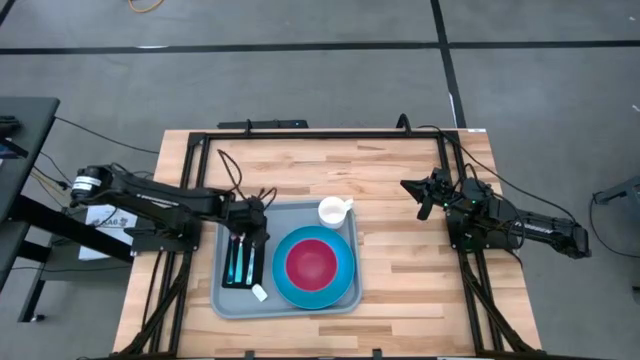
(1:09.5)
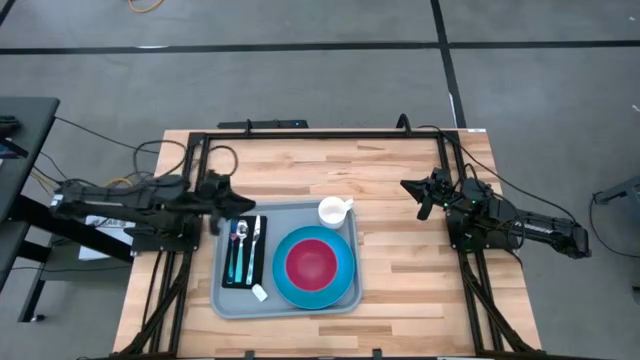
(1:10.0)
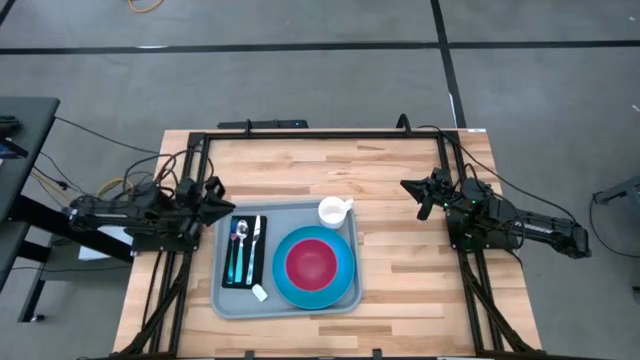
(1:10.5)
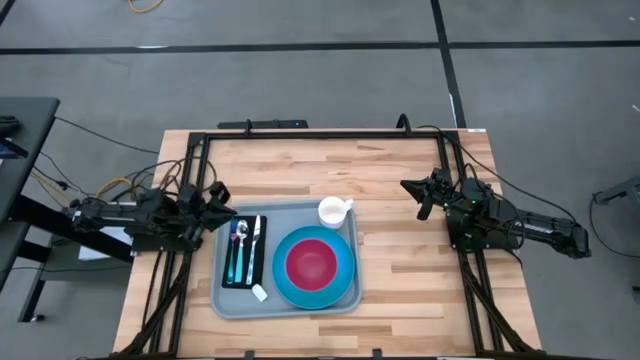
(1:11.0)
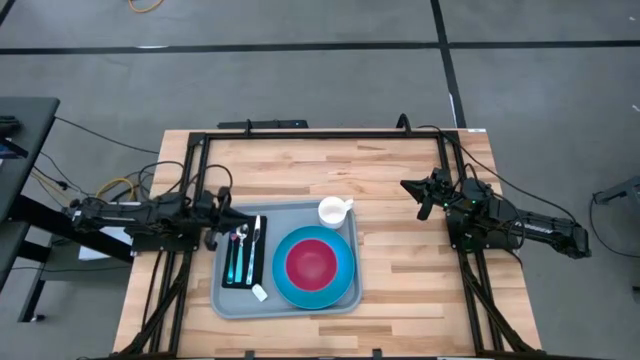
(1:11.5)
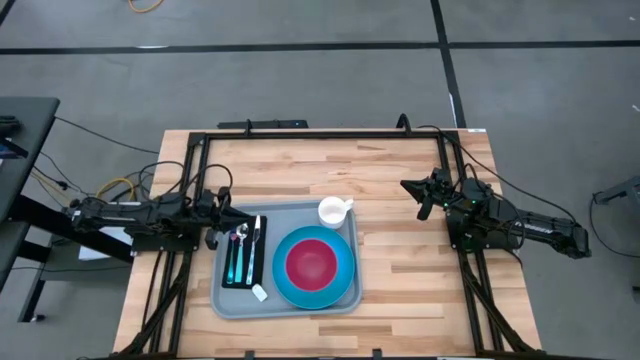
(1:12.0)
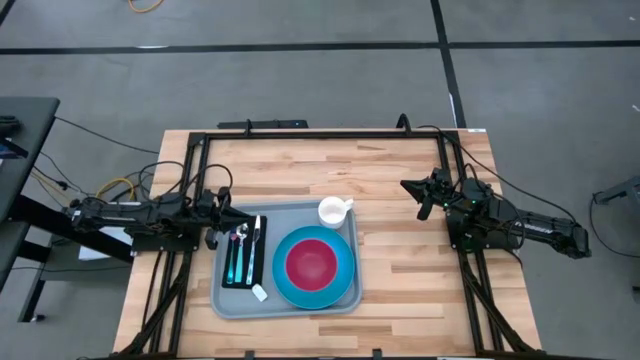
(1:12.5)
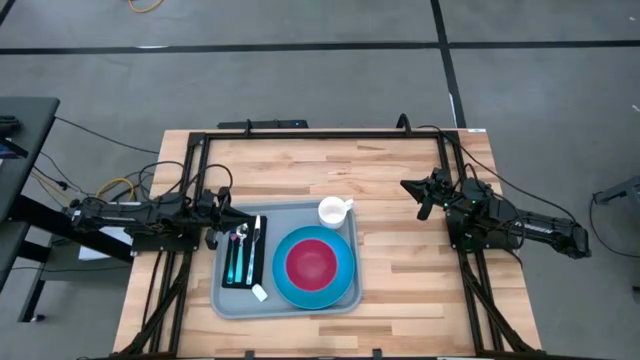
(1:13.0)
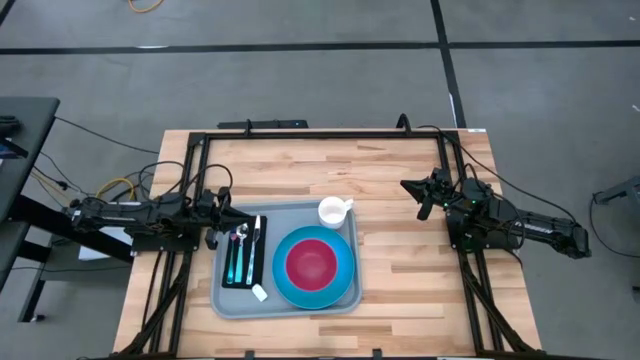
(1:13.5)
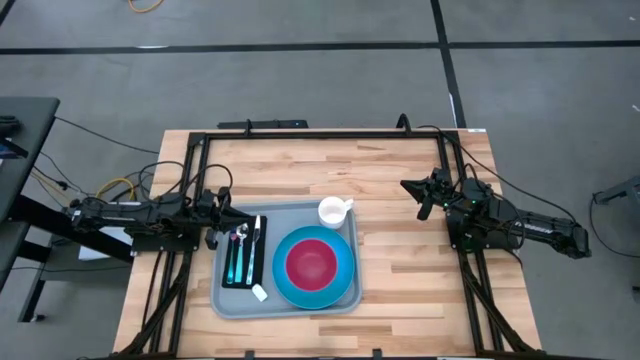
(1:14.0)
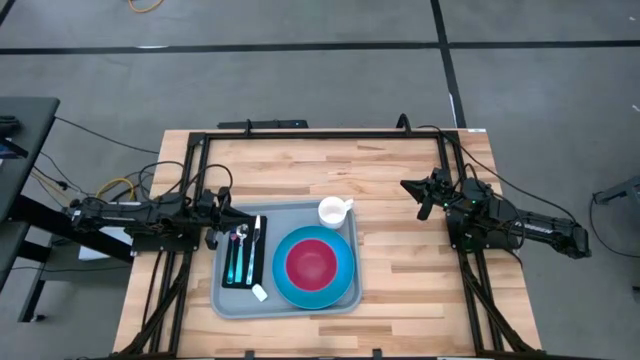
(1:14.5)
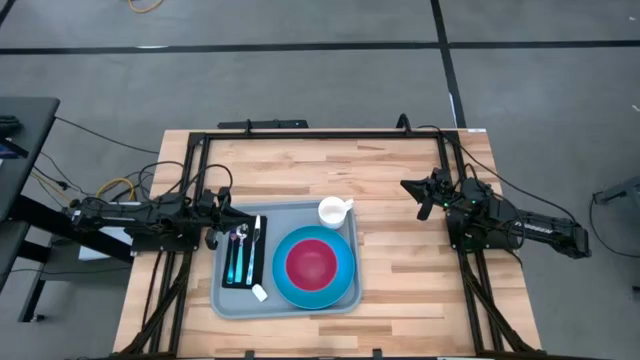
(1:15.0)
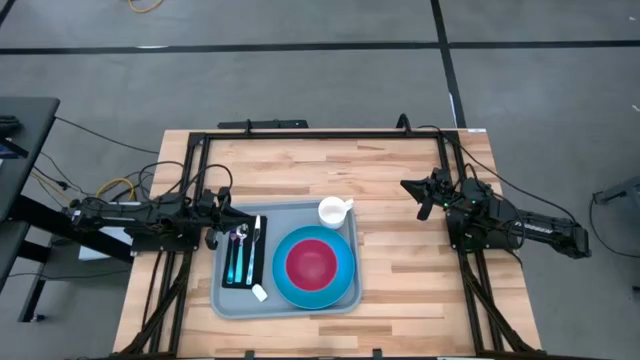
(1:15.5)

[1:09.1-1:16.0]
Task: Set up tray
Return to Home Position

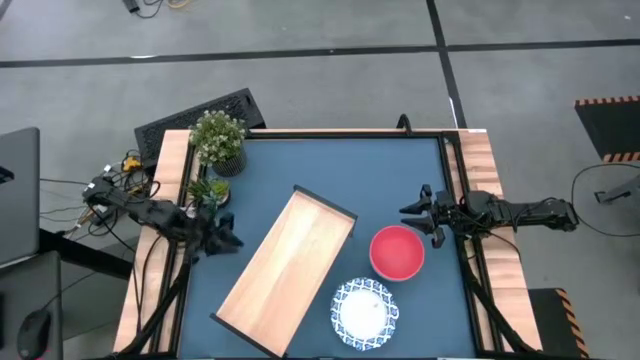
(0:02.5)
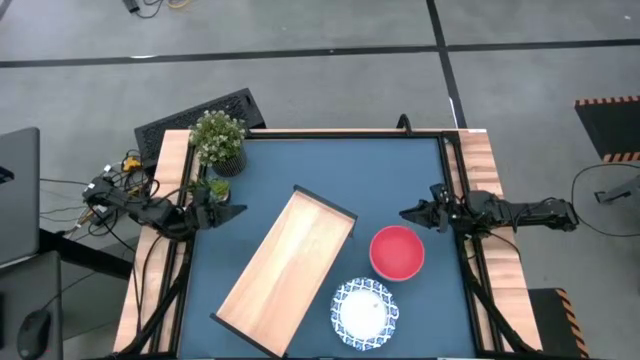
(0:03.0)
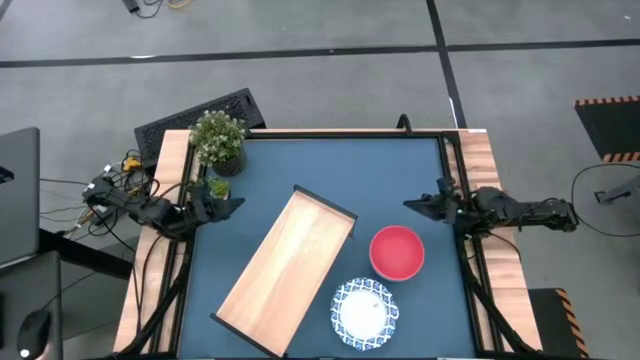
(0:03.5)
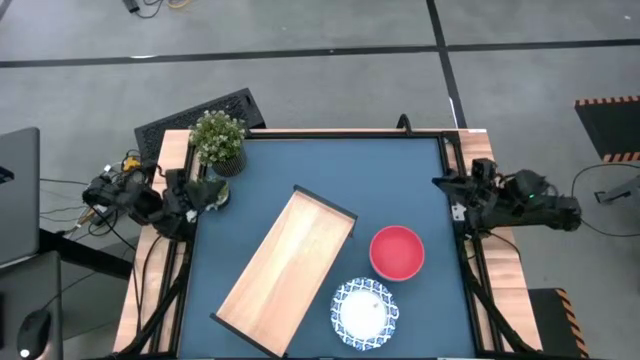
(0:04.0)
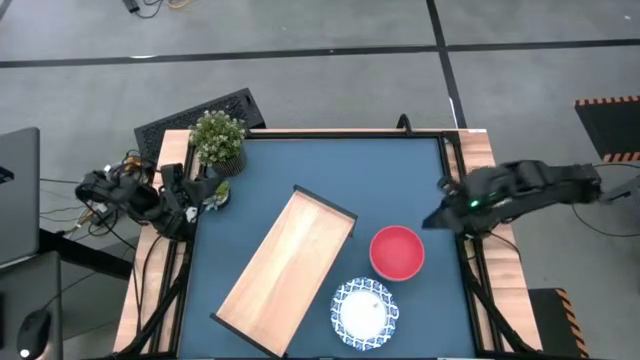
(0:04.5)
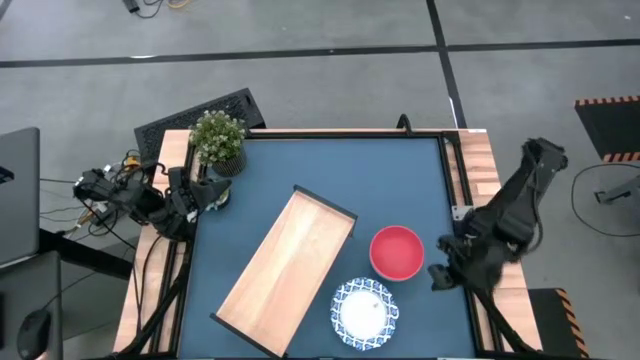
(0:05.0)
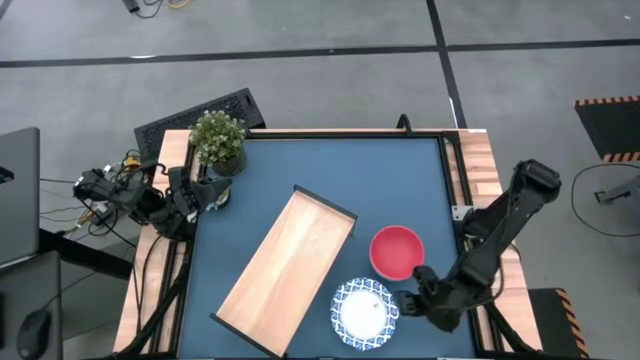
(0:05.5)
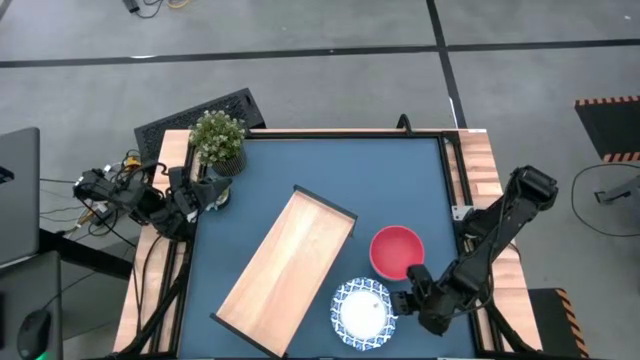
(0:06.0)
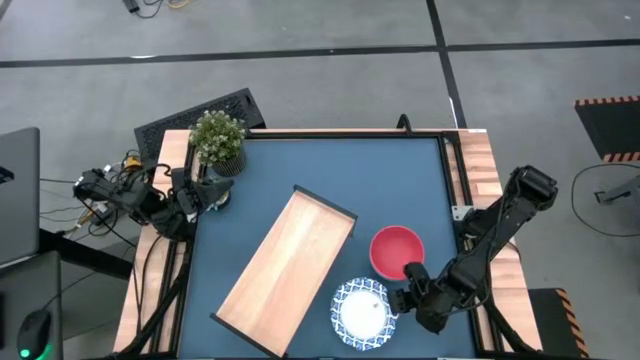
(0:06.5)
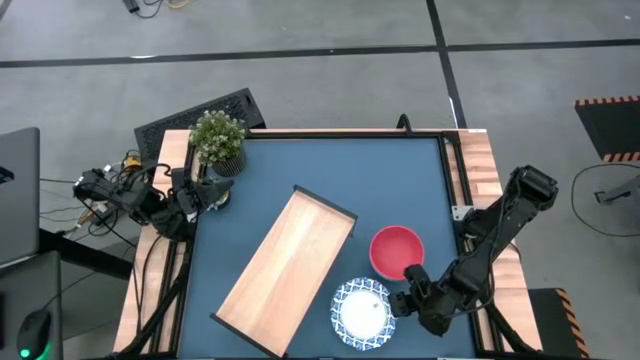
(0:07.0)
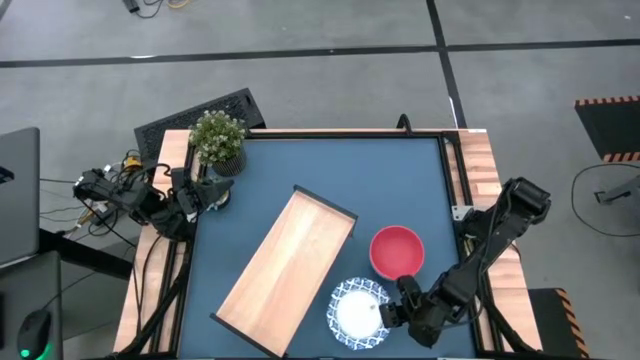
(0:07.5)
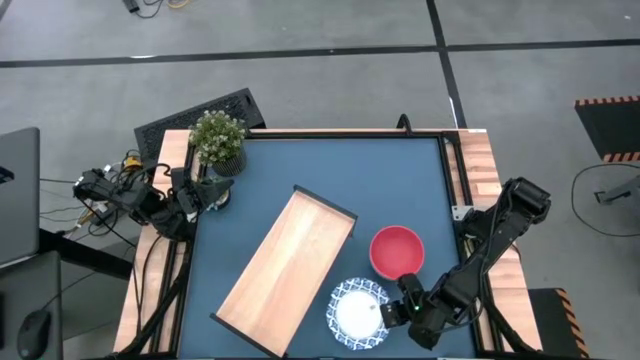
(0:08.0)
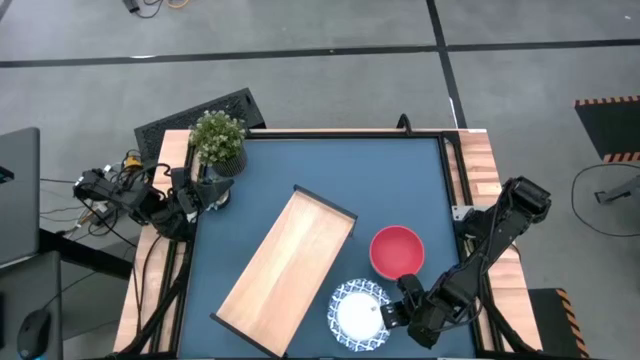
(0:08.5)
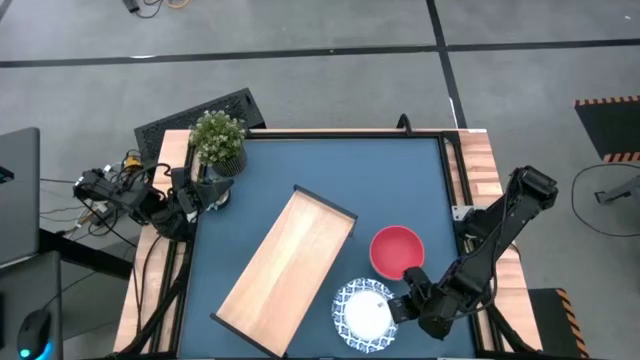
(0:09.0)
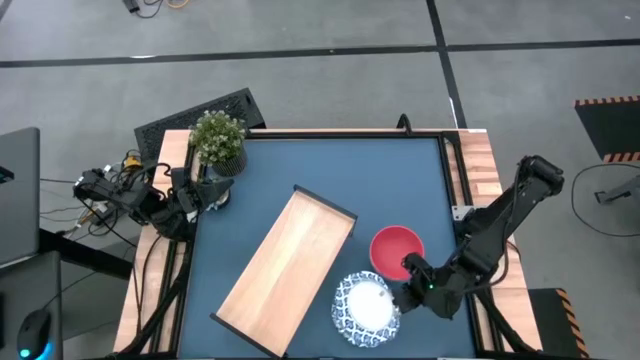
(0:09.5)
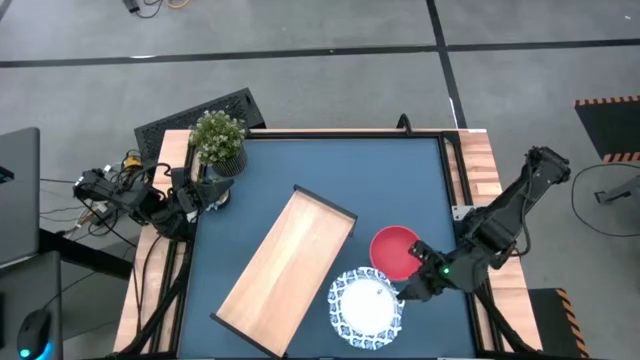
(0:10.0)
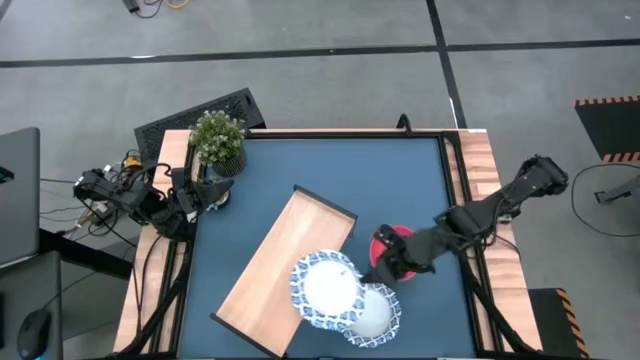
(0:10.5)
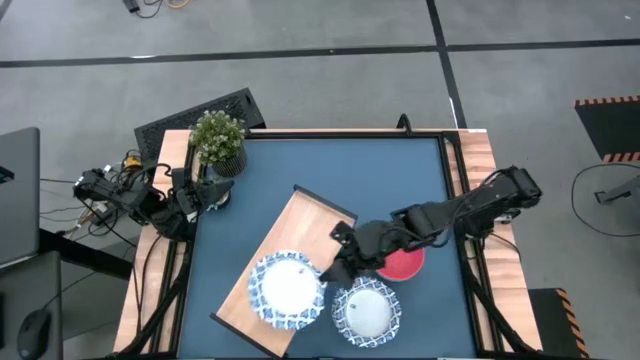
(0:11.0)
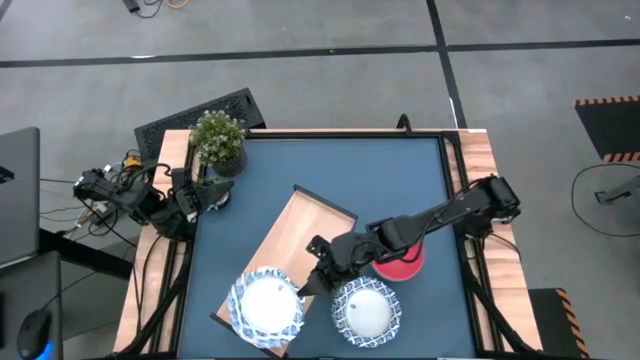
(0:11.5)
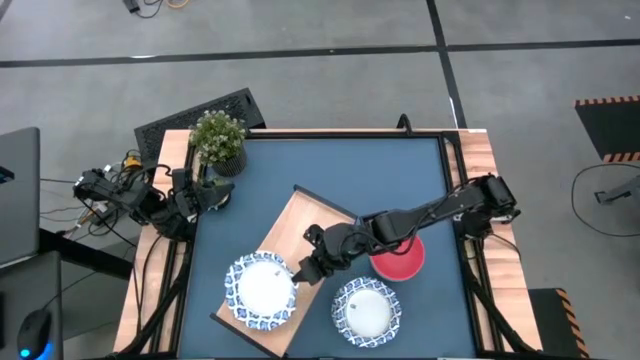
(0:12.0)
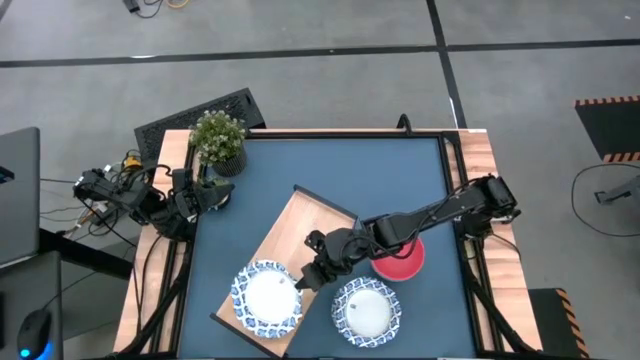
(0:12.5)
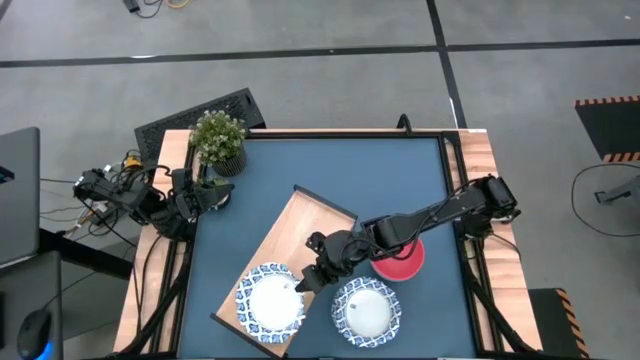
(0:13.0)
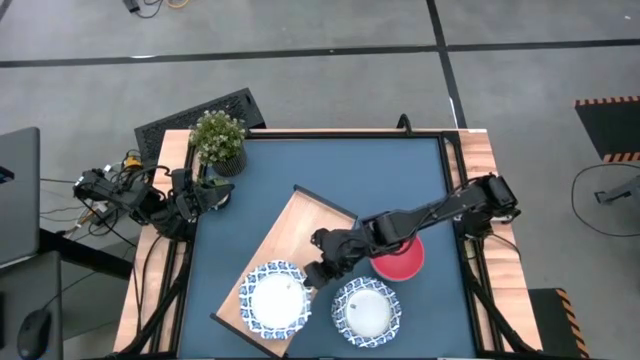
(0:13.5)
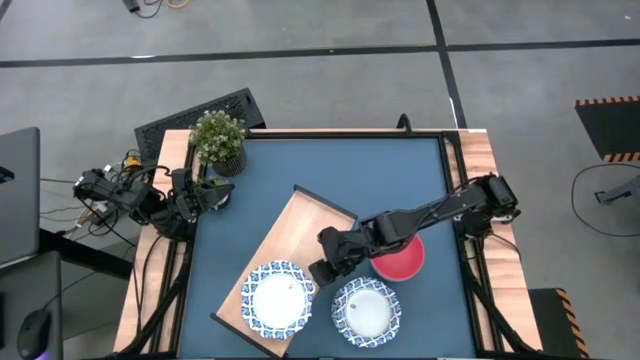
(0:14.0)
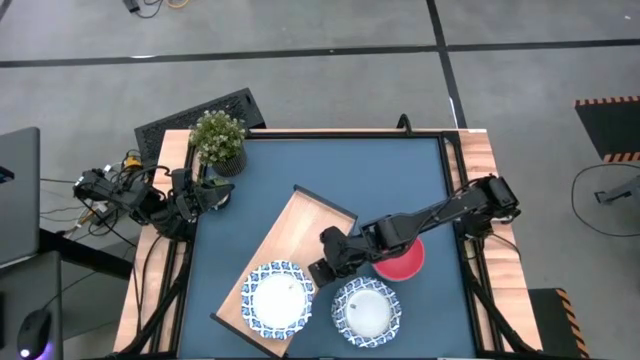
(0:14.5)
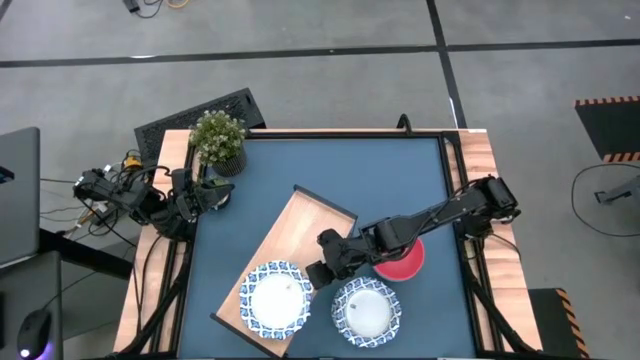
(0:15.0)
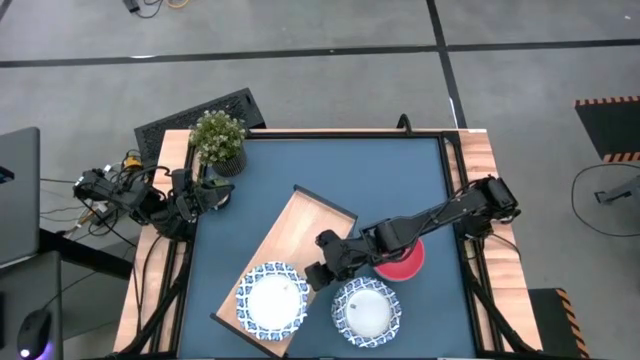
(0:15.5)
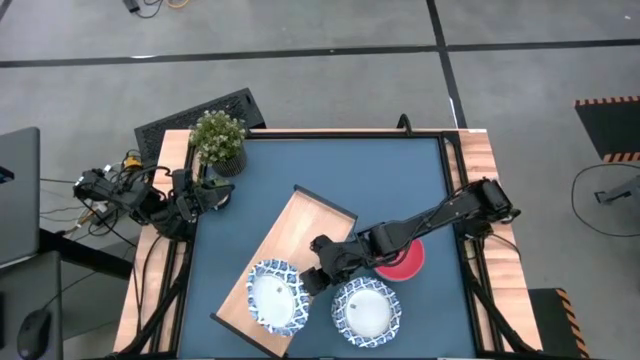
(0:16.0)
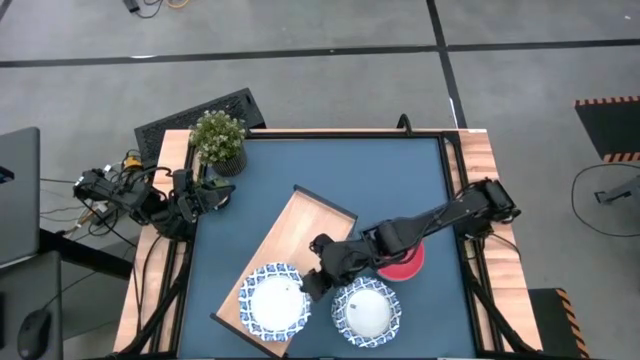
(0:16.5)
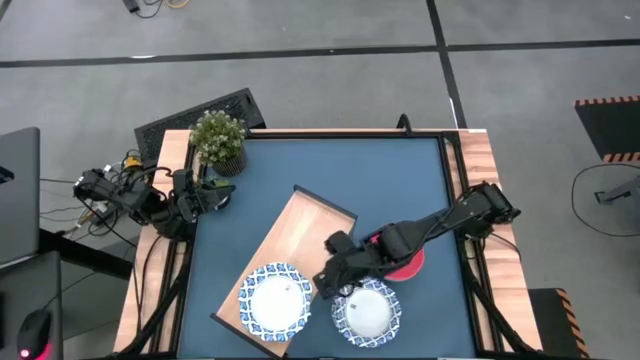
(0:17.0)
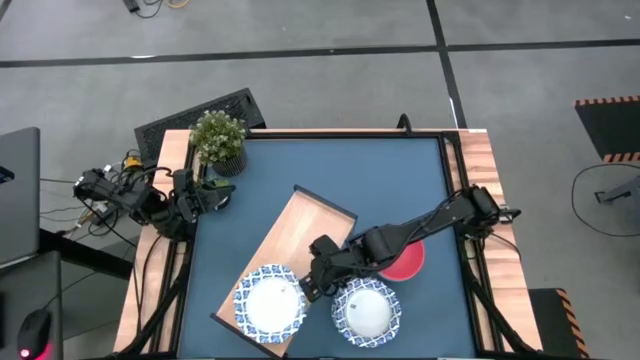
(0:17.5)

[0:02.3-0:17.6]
Task: Place and stack bowls onto a shelf
Put the white bowl on the shelf
